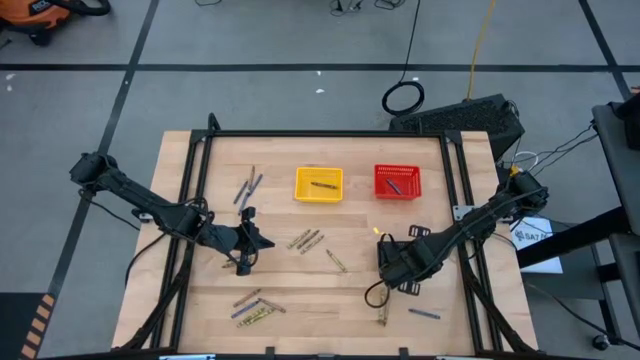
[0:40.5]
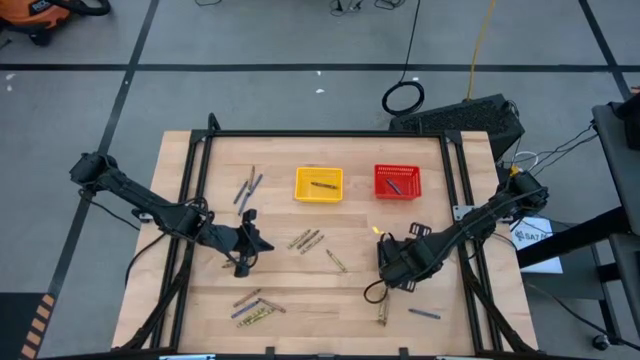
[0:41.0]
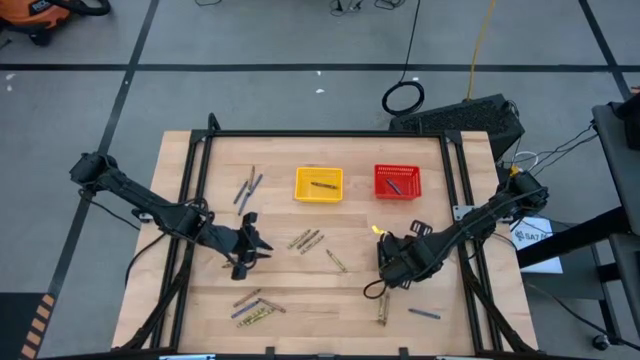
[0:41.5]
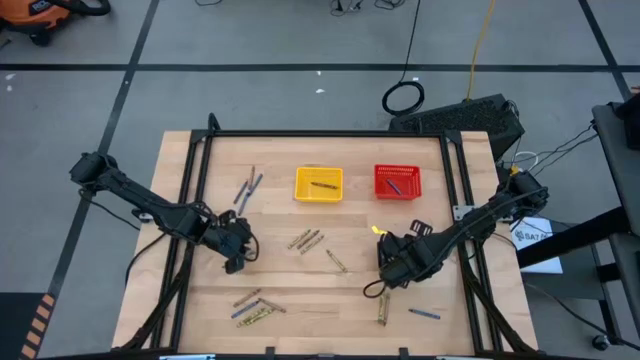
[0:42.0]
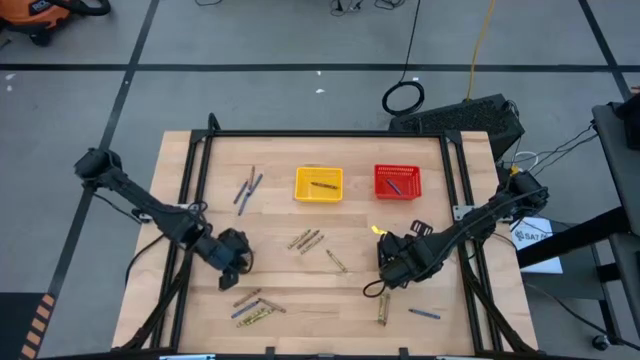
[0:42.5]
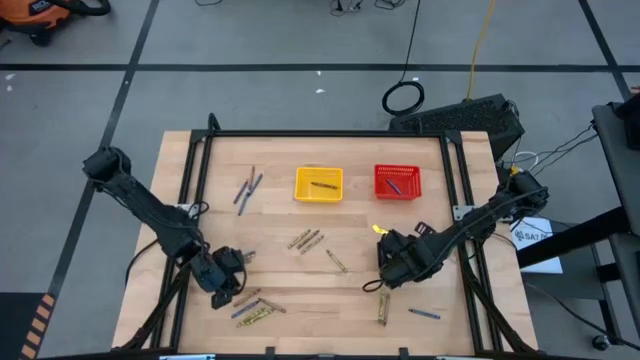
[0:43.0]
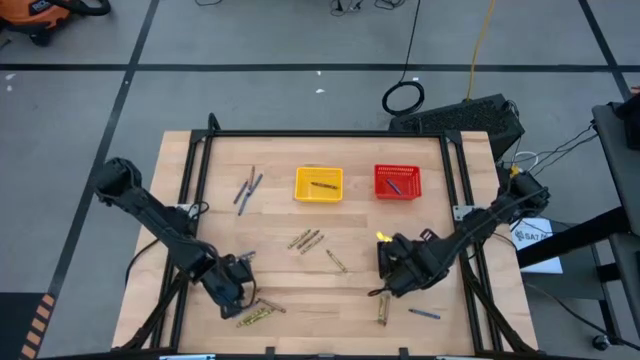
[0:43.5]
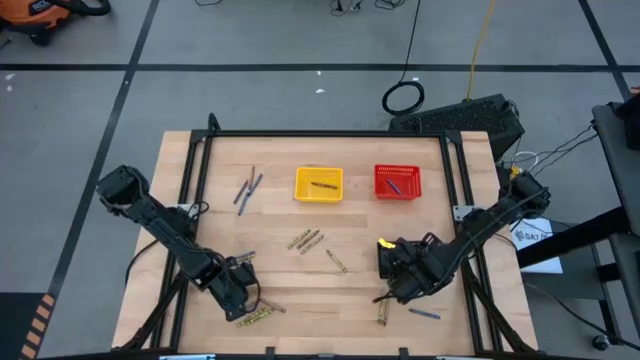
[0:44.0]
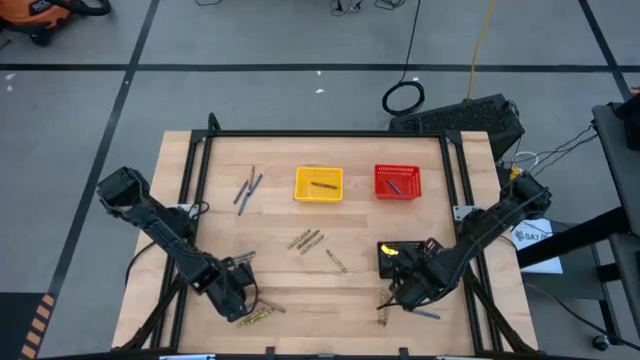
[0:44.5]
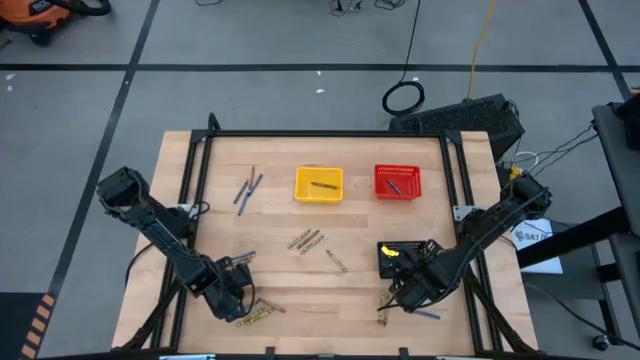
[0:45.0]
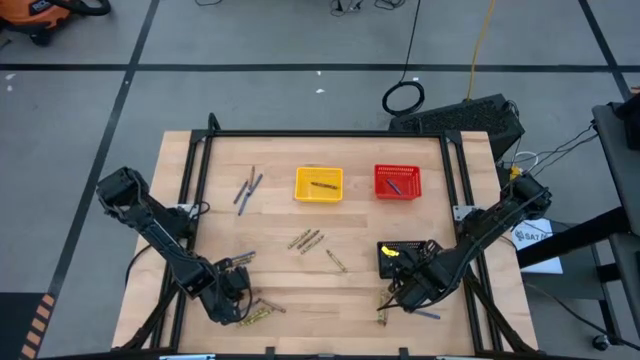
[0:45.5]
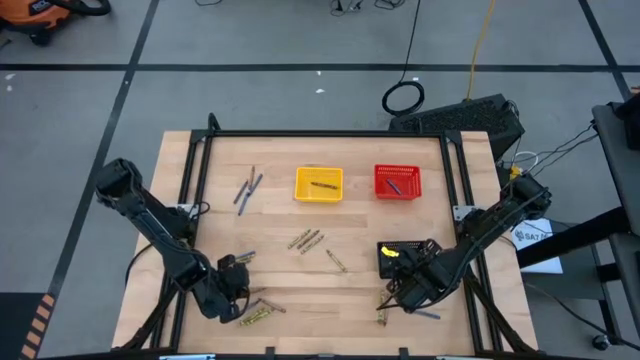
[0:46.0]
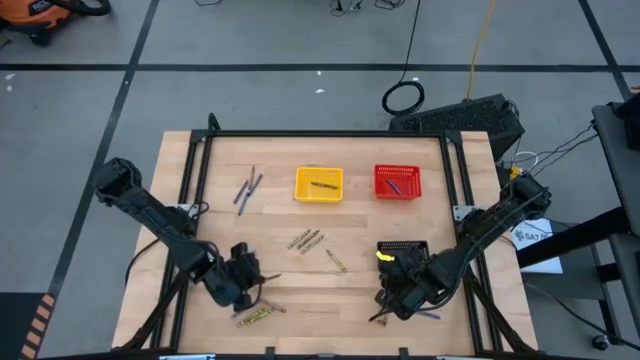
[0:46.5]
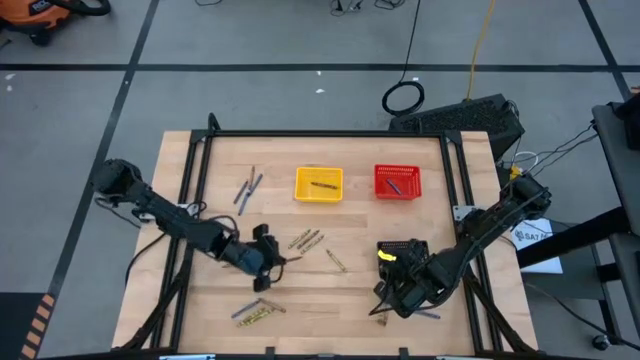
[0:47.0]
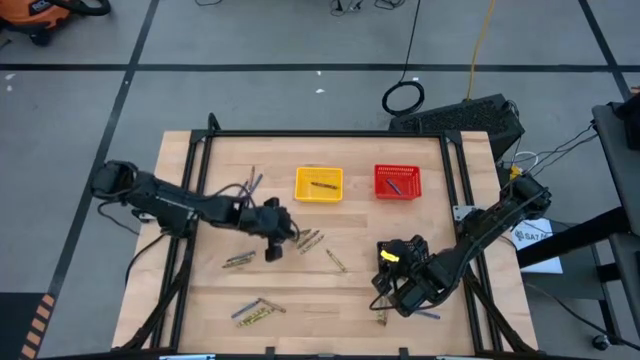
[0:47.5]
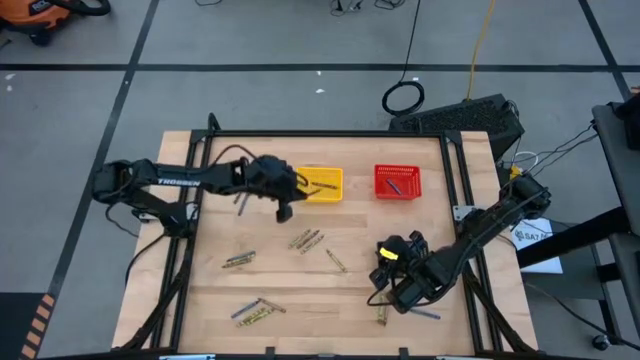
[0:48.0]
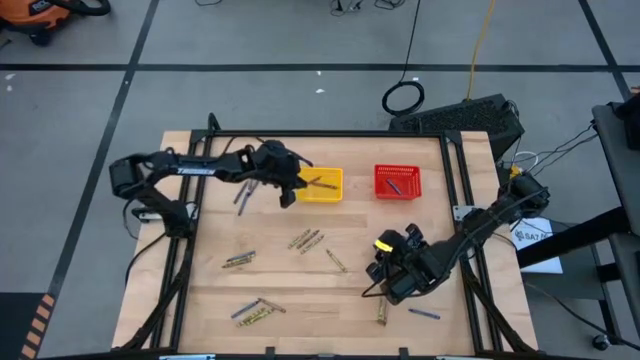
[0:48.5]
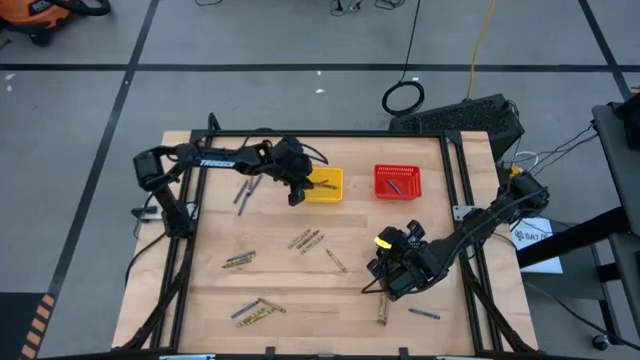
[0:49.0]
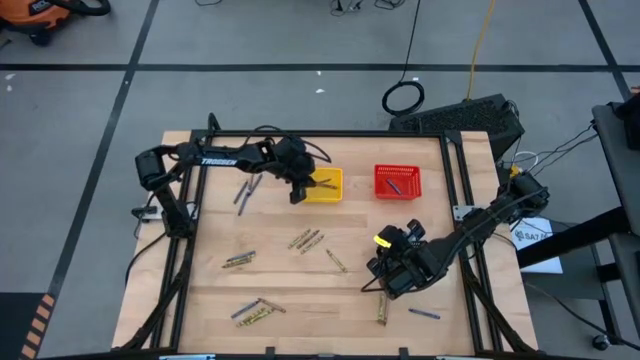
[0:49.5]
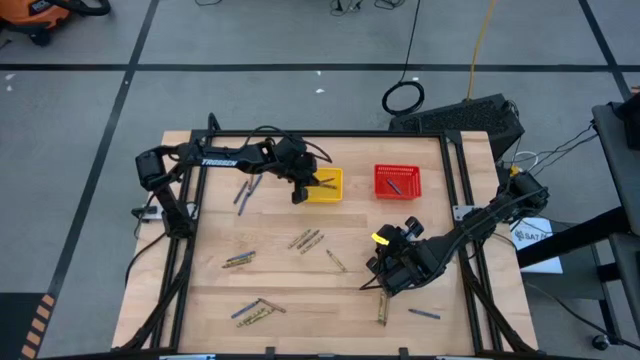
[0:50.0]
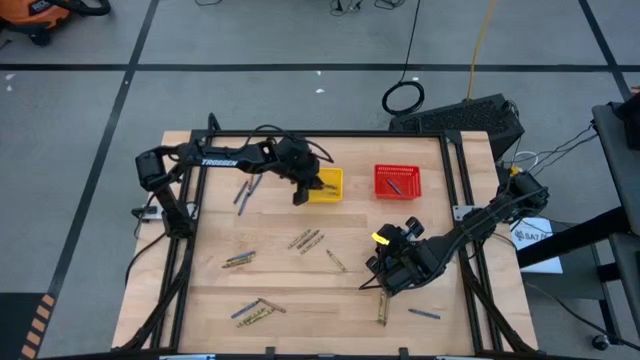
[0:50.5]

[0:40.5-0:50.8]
Task: Sort crayons
Put the brown crayon into the yellow bin

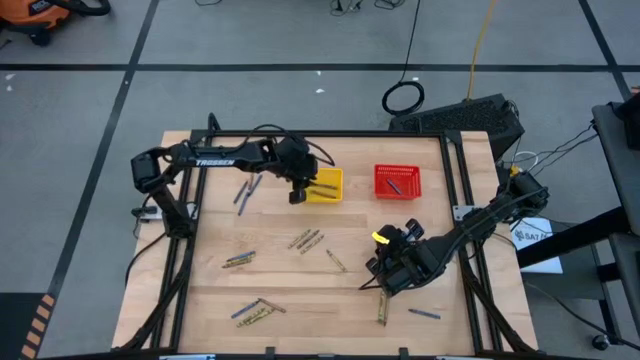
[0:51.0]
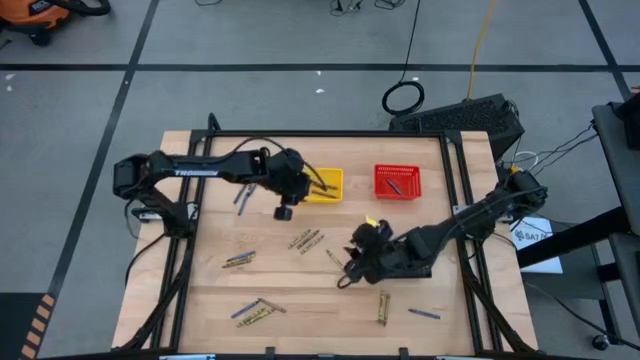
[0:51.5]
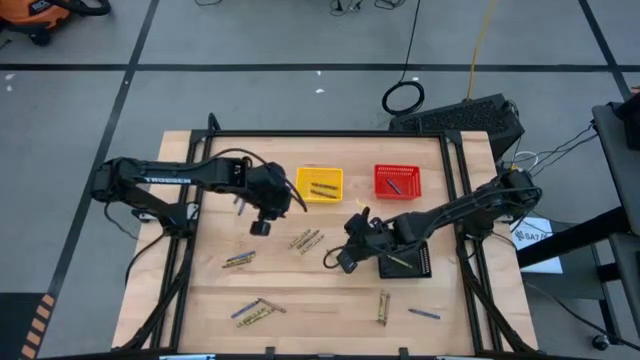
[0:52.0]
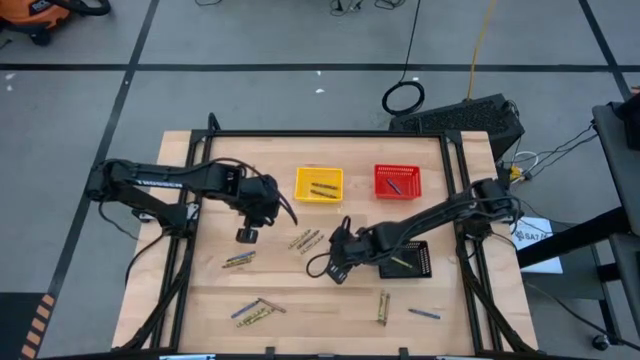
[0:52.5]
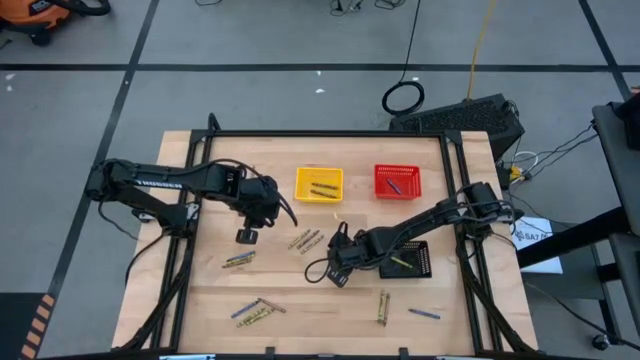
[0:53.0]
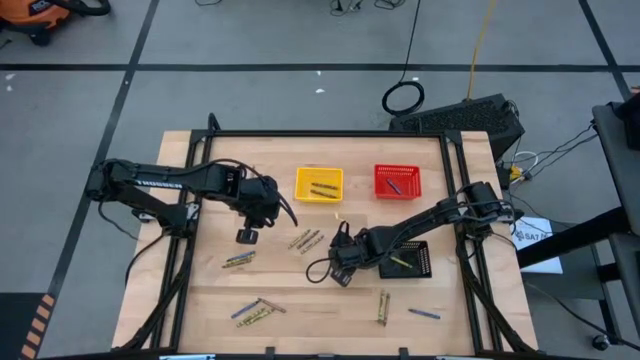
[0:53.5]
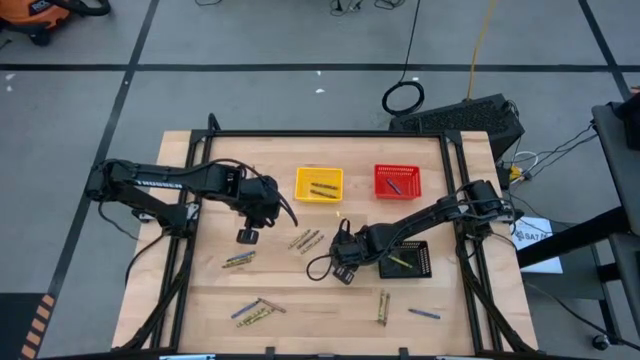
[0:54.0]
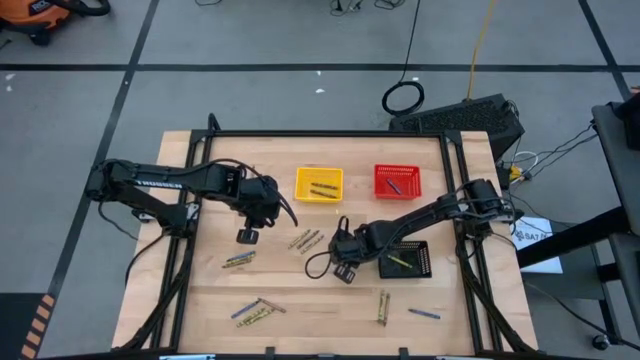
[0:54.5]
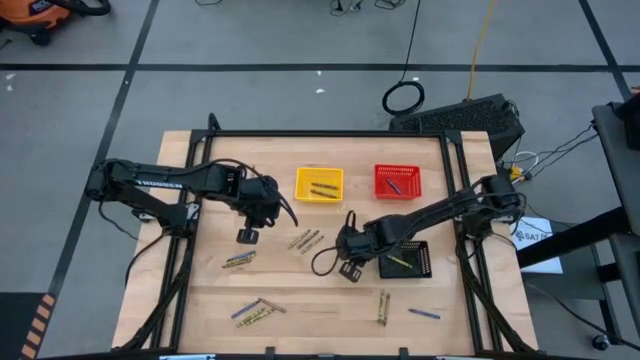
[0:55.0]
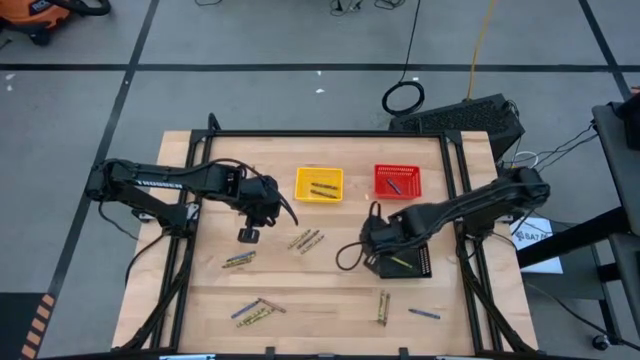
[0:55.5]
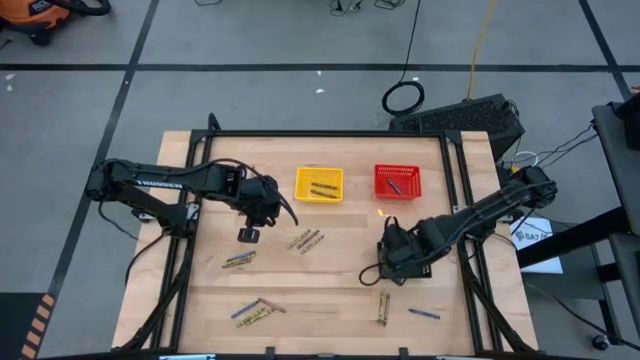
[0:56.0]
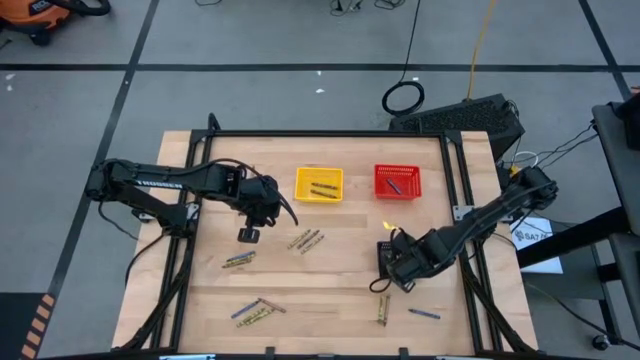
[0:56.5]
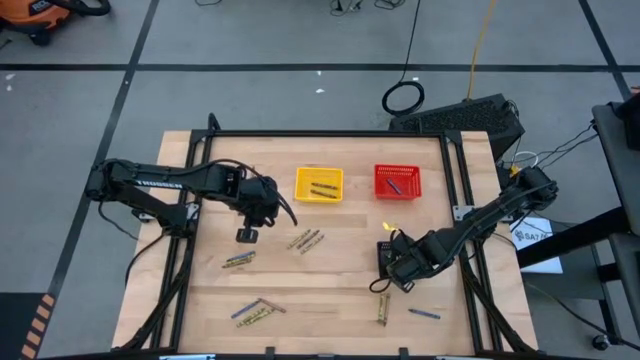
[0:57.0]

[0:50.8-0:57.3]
Put the green crayon into the black bin

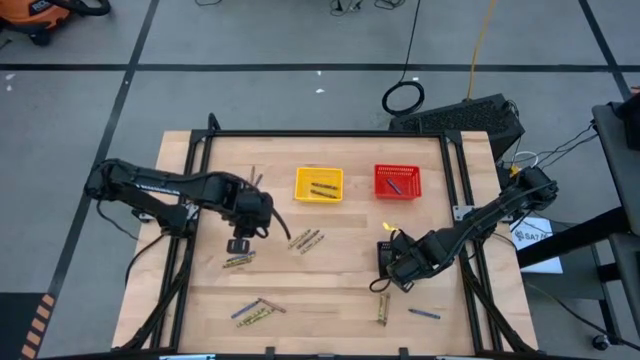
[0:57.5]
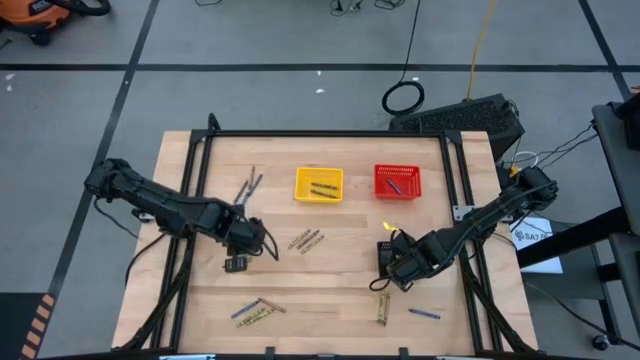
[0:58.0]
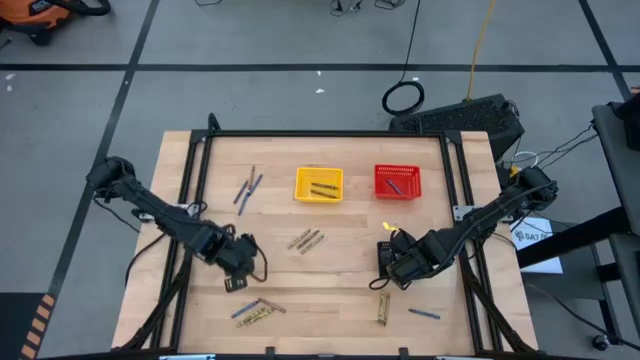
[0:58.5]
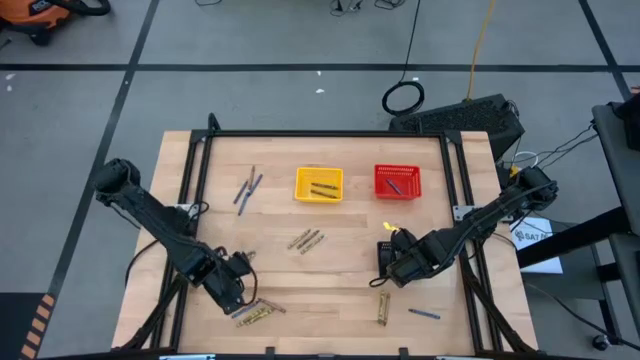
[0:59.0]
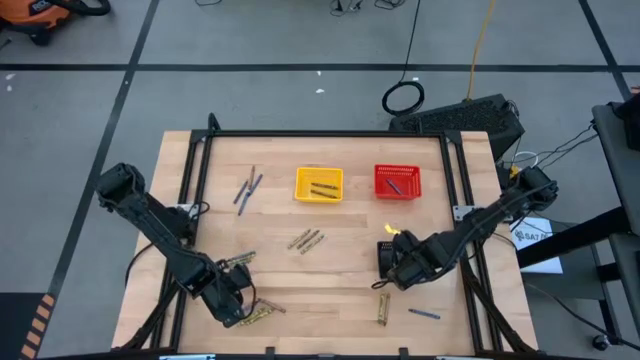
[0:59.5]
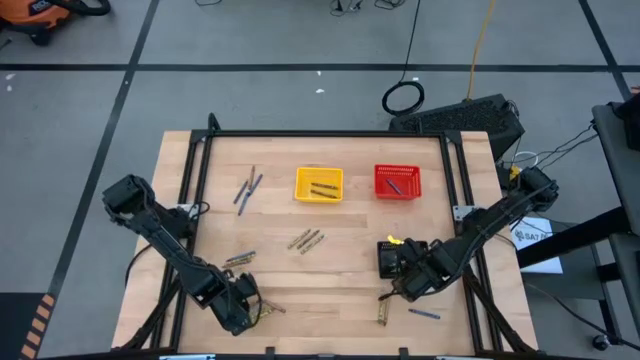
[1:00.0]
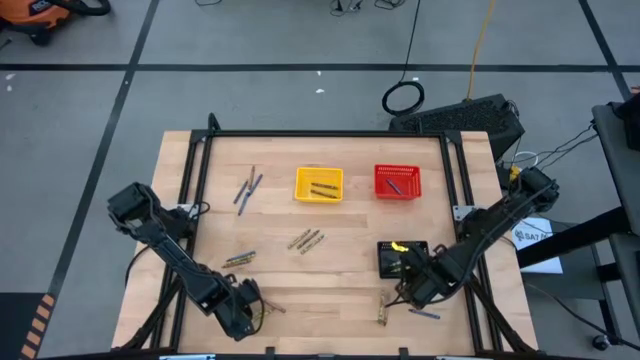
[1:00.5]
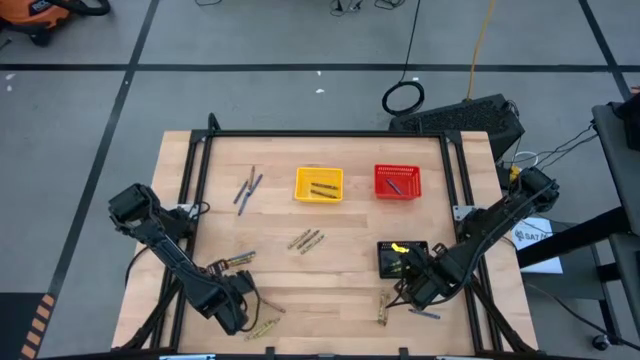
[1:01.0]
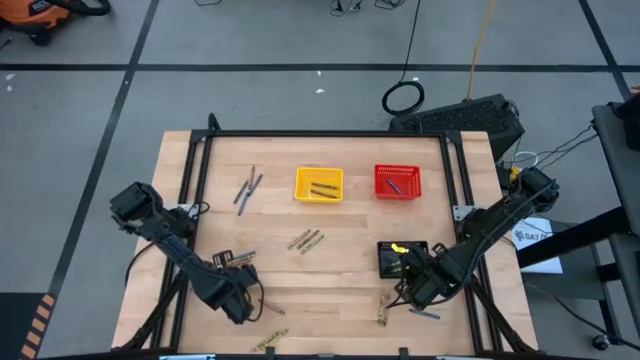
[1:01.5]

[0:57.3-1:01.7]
Put the blue crayon into the red bin
